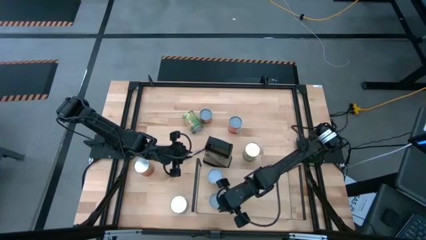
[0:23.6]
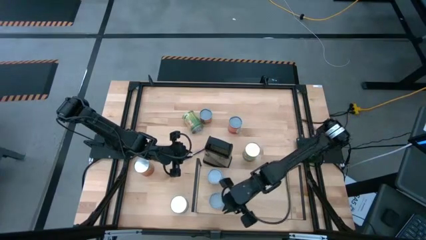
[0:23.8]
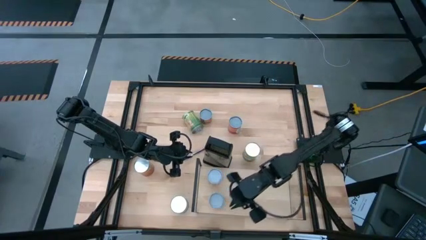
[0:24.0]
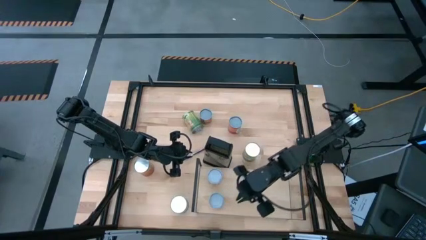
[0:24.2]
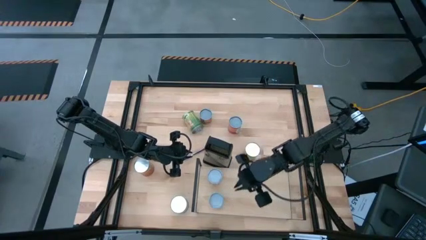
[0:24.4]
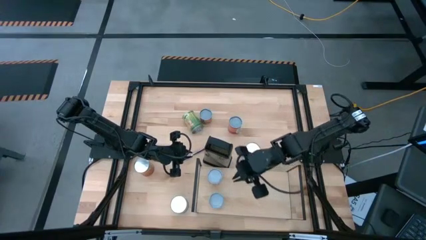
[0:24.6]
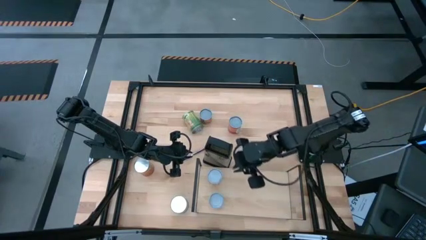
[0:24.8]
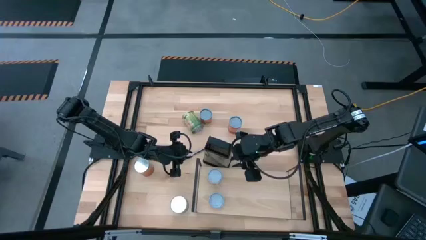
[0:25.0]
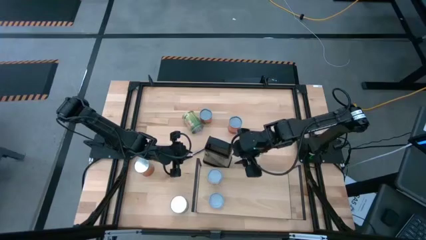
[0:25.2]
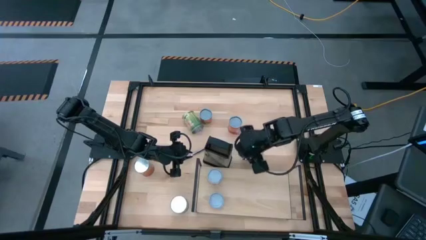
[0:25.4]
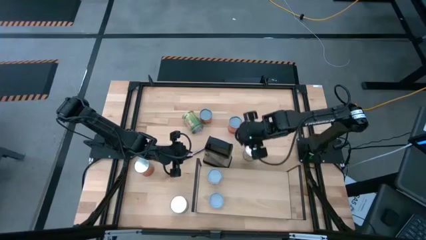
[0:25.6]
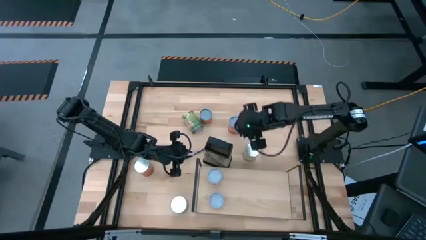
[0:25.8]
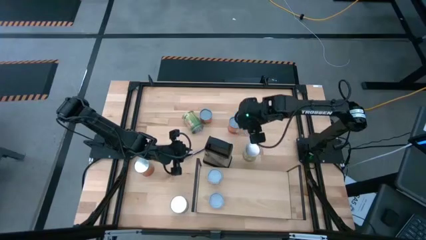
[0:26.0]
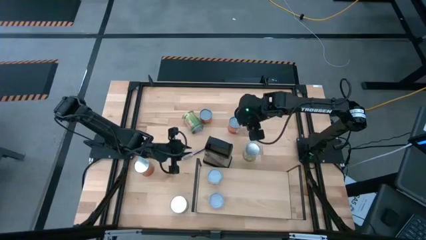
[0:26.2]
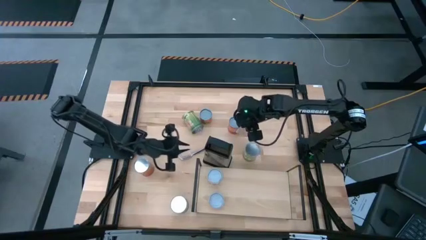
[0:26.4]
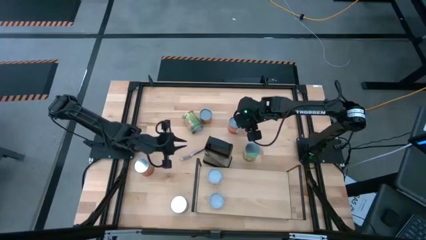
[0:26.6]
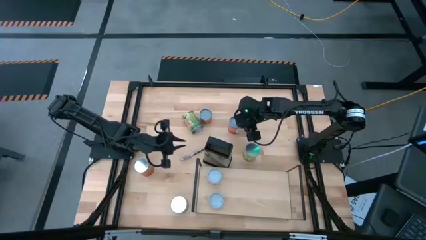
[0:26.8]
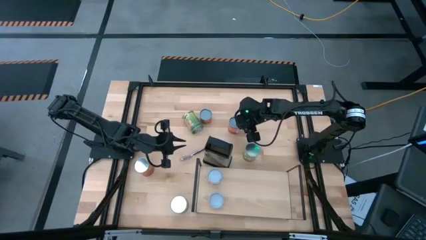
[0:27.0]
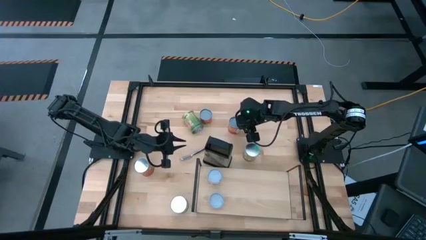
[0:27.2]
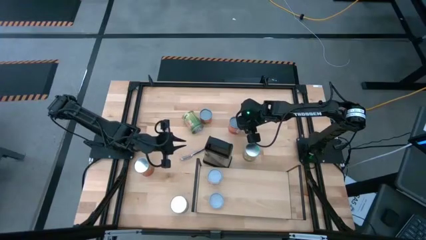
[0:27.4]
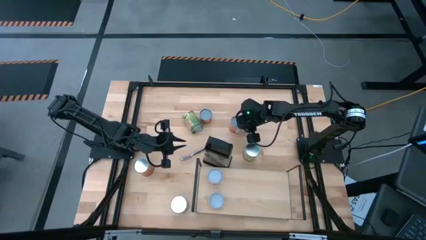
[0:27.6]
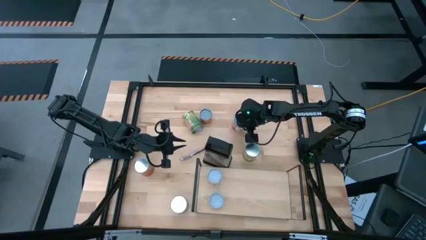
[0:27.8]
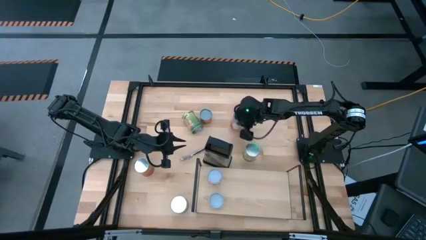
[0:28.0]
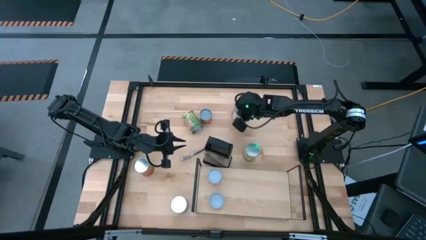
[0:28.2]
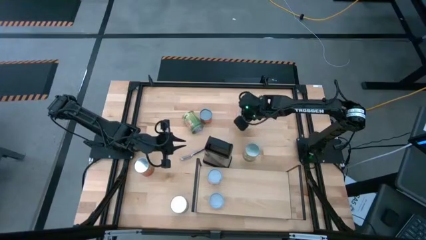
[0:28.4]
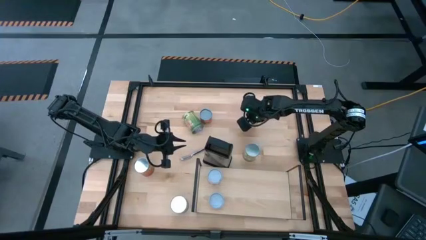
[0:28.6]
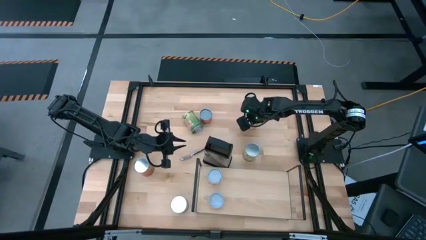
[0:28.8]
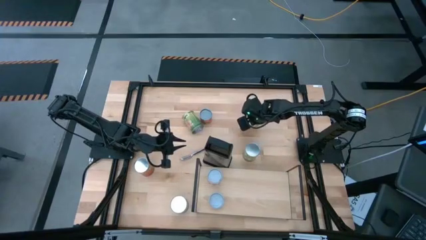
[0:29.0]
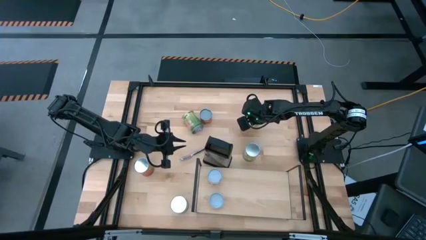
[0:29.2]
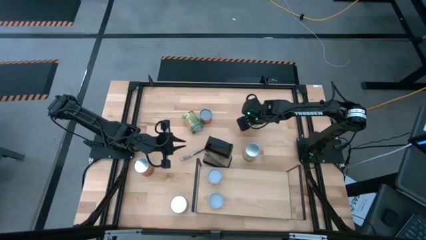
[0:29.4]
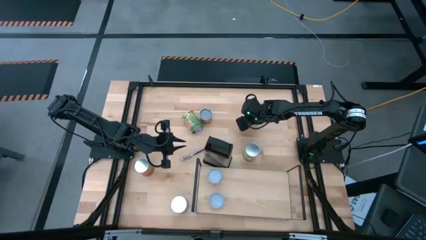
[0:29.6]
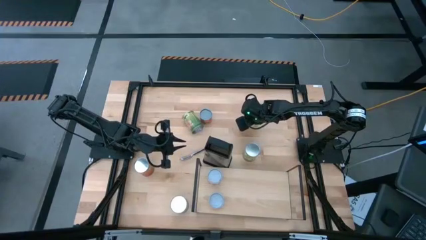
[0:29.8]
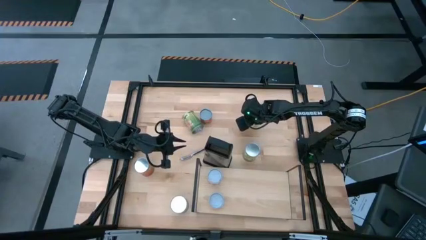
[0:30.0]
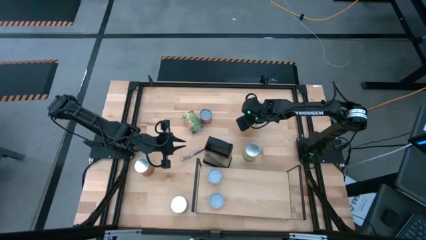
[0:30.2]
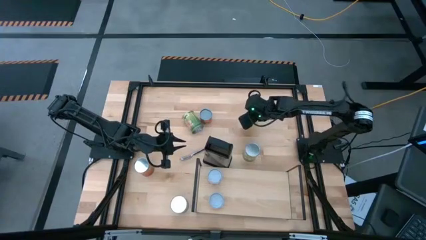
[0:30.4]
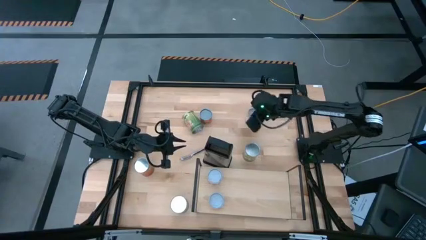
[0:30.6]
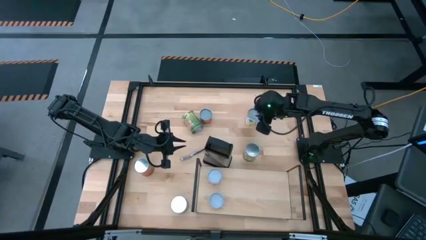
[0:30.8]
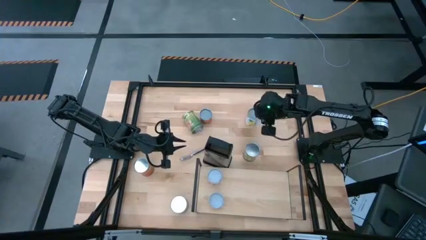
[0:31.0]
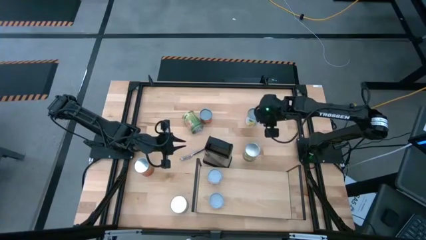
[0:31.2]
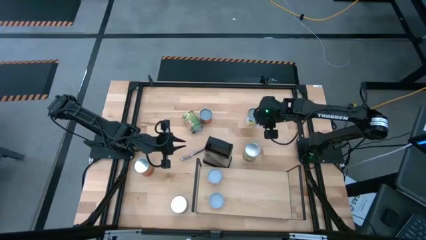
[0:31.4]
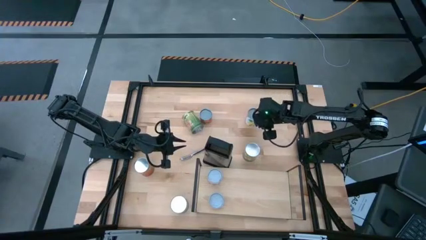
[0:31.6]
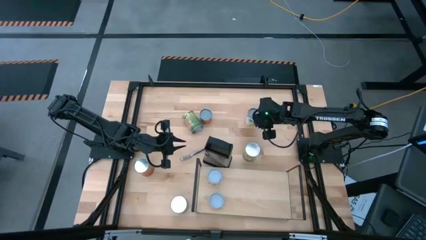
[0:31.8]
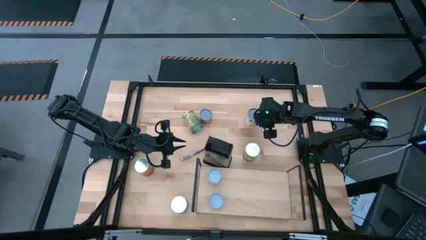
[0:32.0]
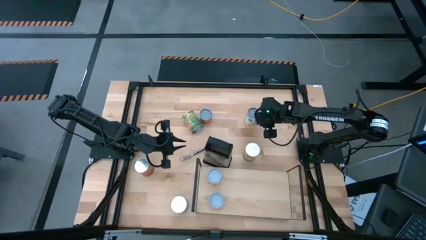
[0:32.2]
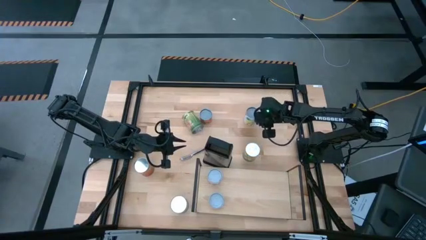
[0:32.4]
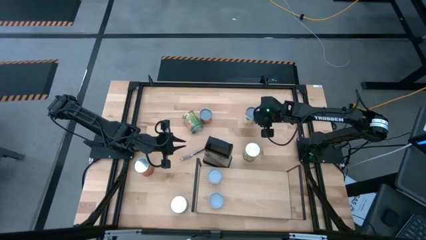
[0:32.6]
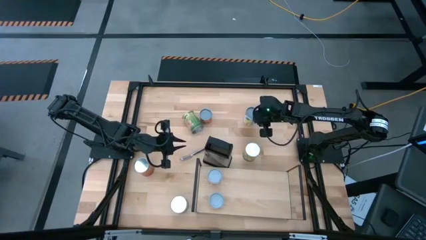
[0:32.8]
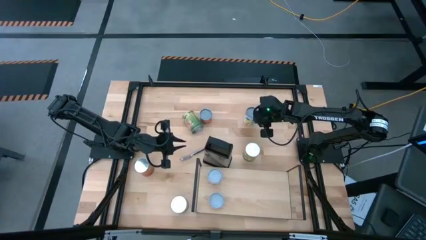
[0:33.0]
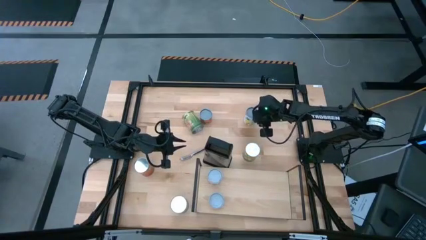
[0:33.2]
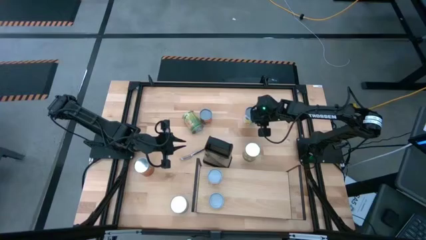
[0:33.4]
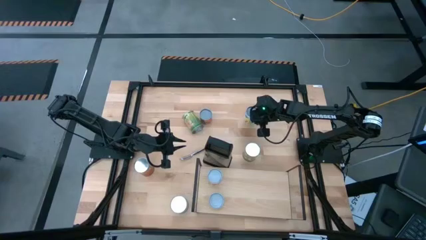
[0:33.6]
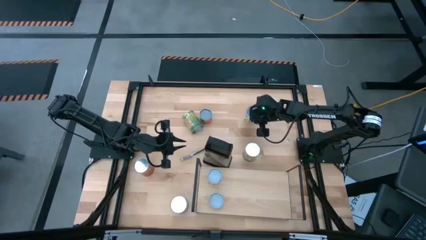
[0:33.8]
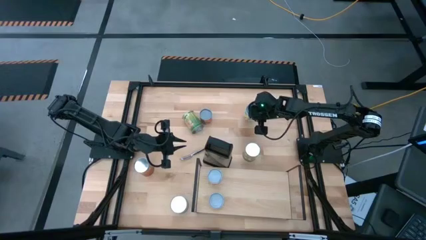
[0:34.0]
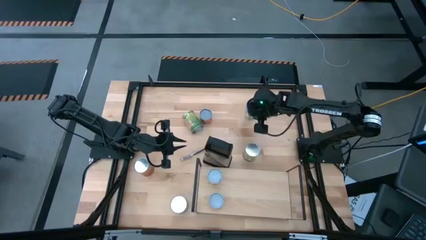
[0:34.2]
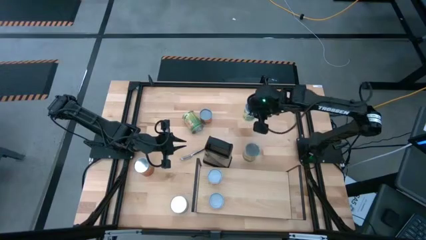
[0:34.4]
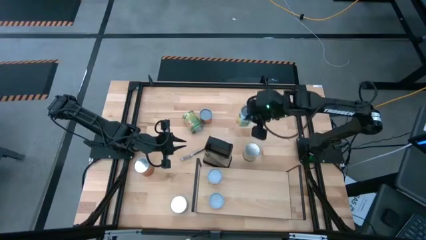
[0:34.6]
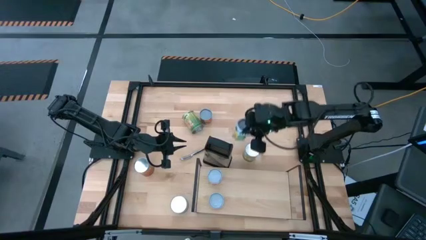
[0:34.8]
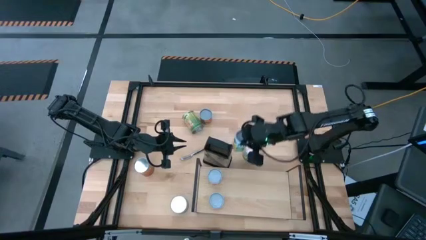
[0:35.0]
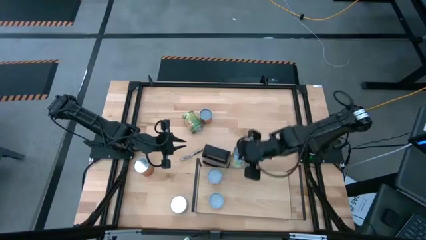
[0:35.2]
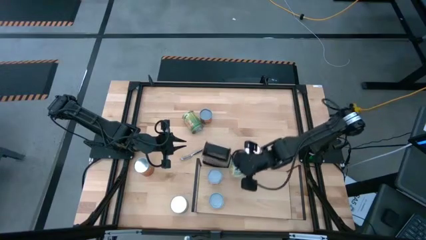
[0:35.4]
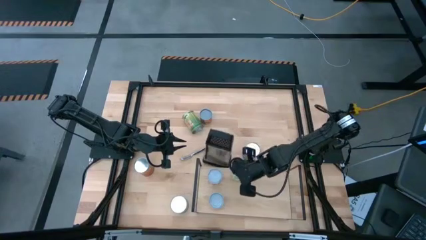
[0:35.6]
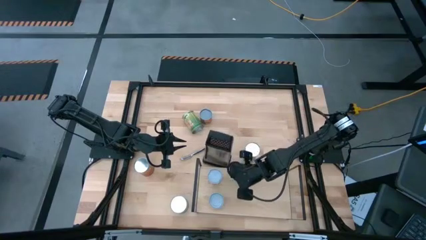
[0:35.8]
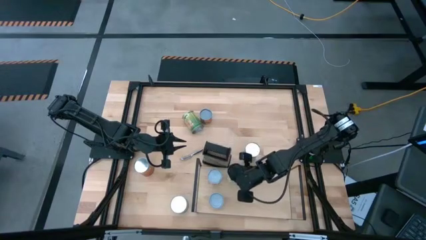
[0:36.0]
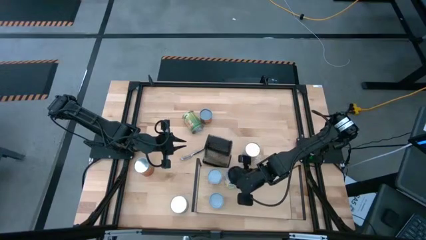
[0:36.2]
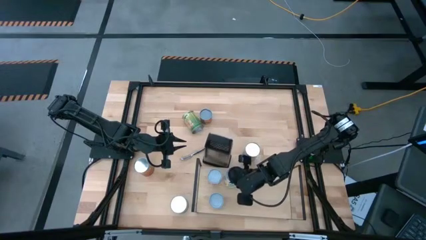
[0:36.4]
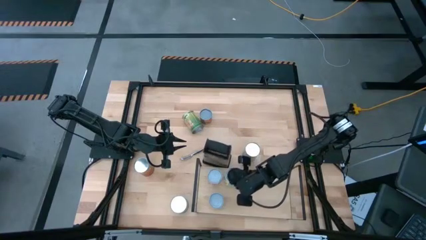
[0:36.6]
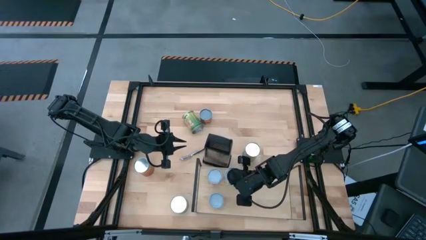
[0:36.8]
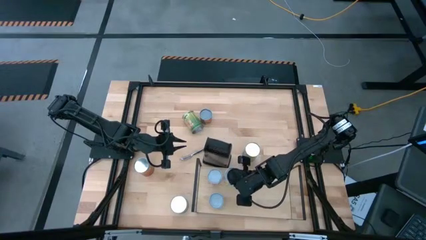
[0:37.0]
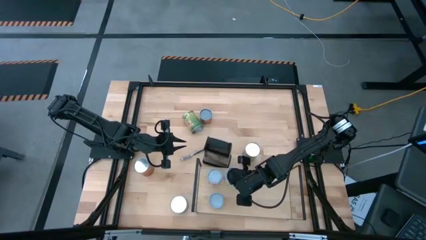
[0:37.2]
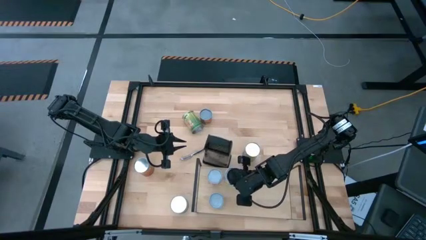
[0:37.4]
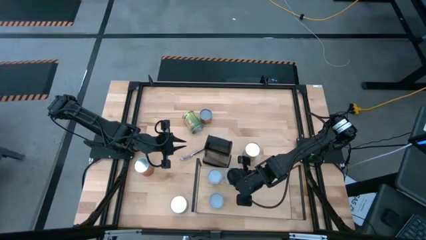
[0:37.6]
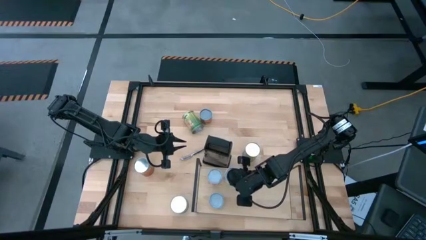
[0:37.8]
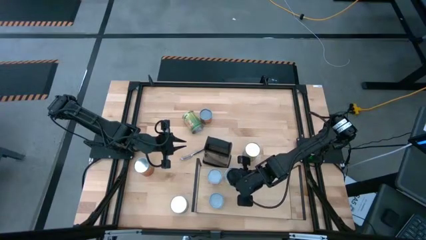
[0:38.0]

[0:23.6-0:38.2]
Task: Pick and place cans onto a shelf
Put the canned mixed fruits on the shelf

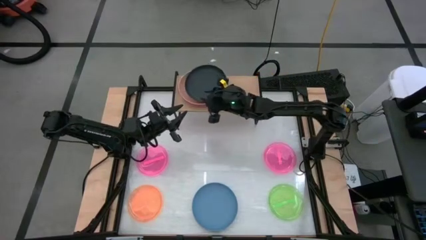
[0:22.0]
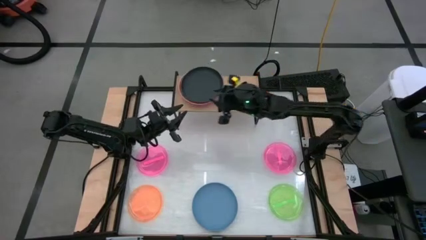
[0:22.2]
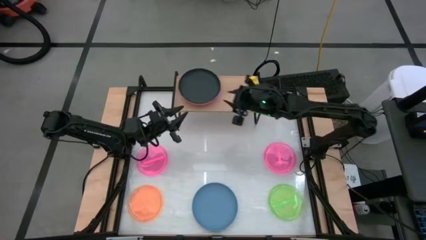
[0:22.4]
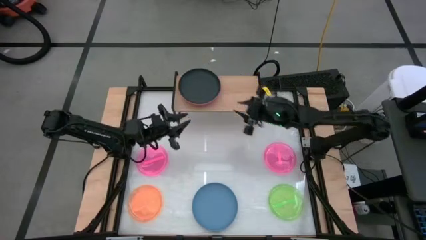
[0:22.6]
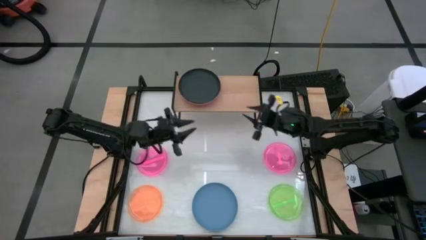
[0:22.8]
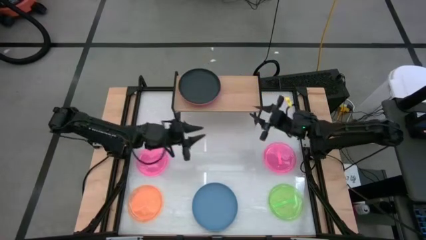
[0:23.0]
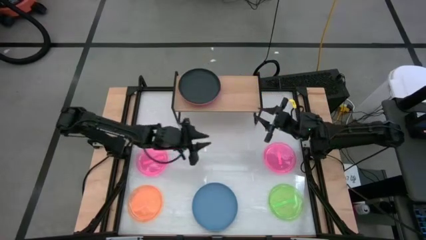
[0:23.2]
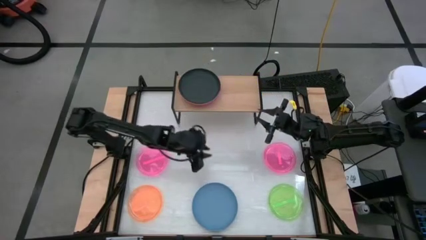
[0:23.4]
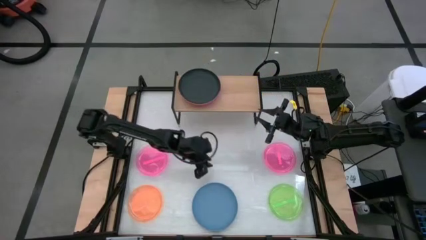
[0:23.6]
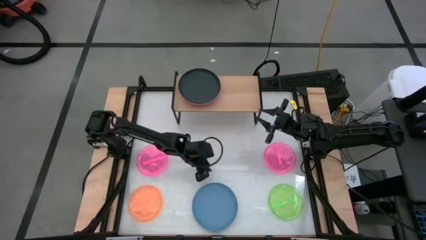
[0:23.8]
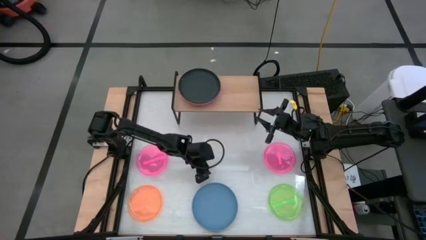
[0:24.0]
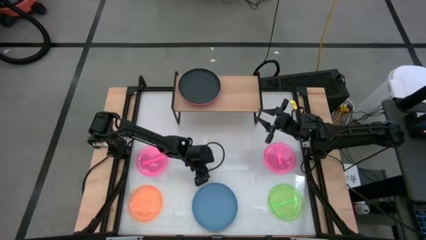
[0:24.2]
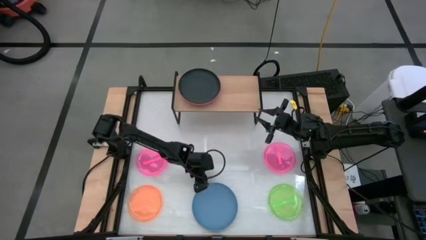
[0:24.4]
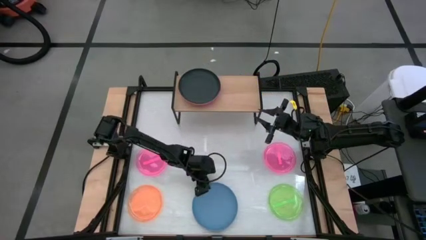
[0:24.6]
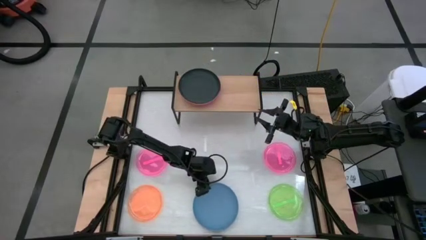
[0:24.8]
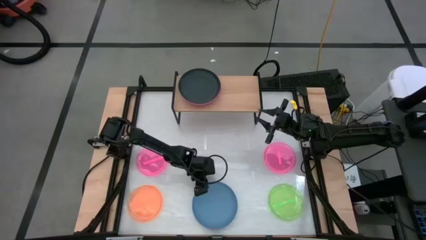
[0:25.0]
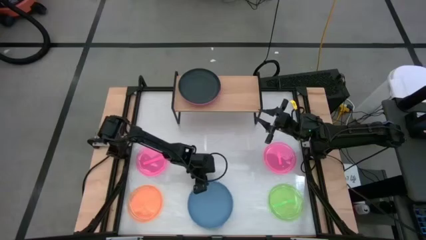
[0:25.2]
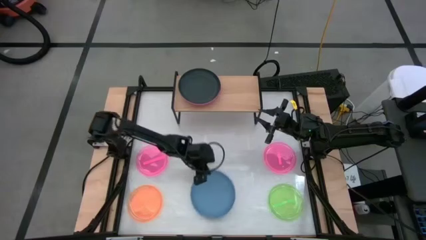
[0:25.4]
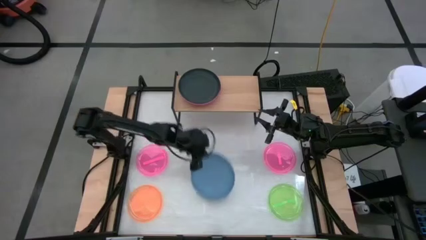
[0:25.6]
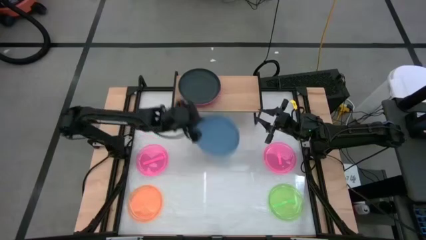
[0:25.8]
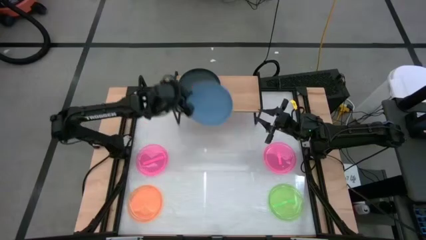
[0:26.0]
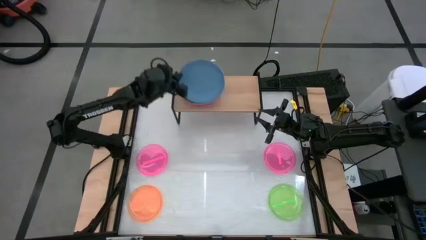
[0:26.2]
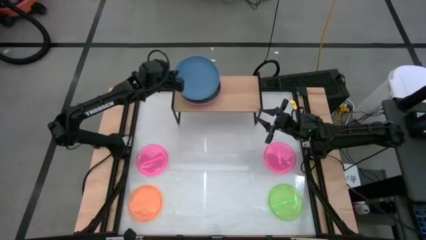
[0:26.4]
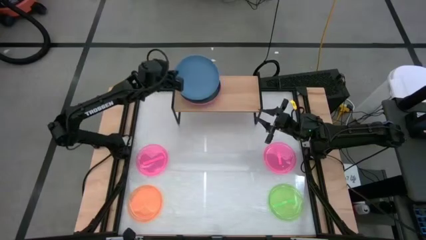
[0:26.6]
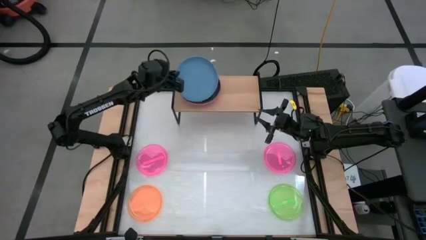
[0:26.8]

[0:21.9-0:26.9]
Task: Place and stack plates onto a shelf
Stack the blue plate on the black plate on the shelf
